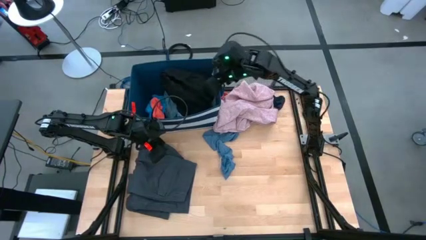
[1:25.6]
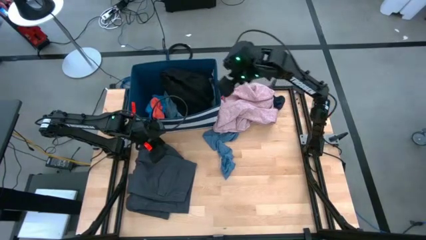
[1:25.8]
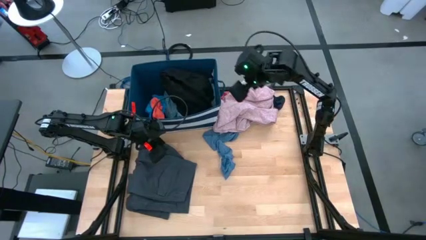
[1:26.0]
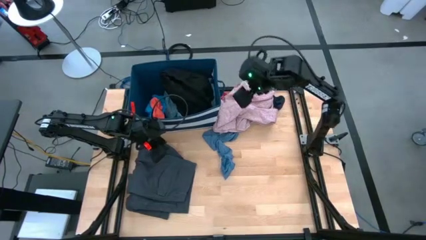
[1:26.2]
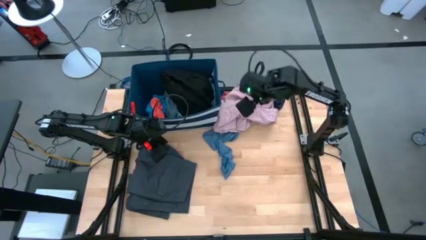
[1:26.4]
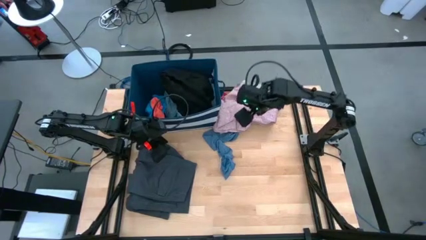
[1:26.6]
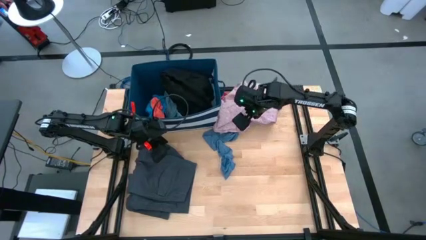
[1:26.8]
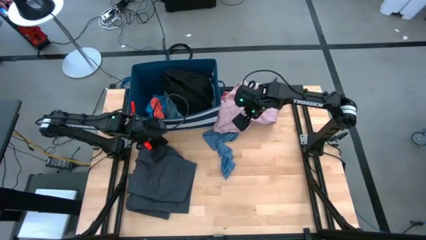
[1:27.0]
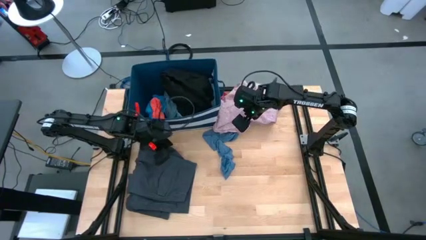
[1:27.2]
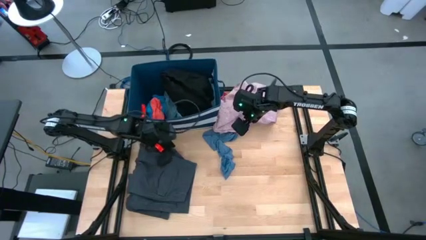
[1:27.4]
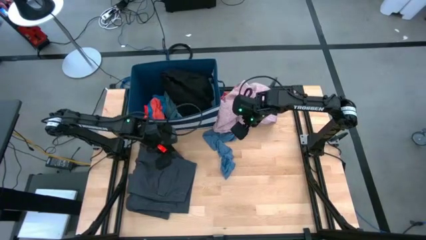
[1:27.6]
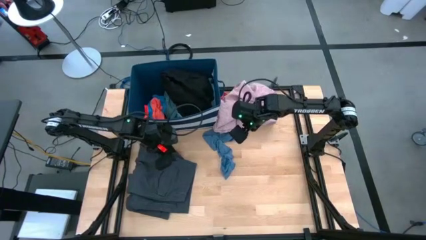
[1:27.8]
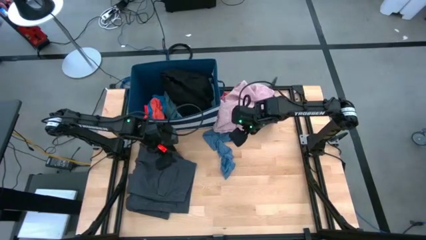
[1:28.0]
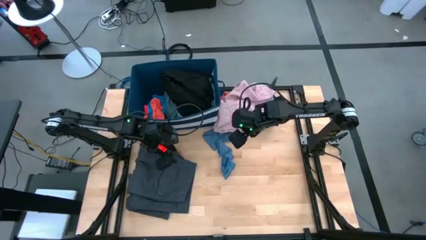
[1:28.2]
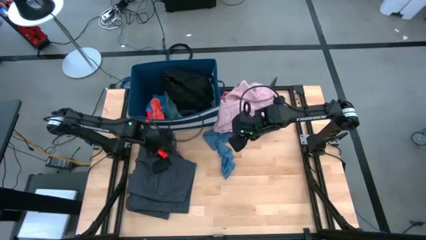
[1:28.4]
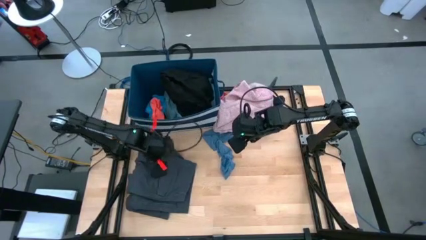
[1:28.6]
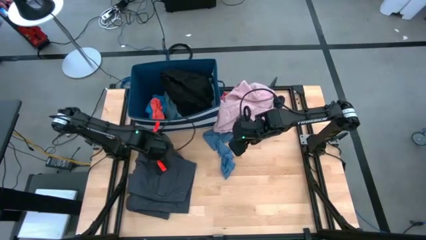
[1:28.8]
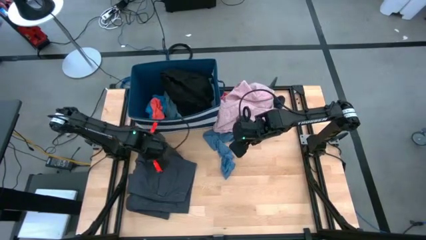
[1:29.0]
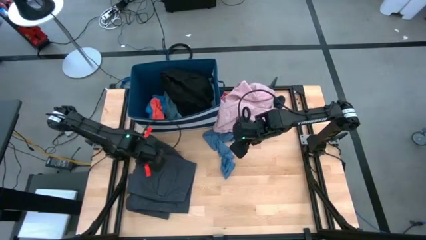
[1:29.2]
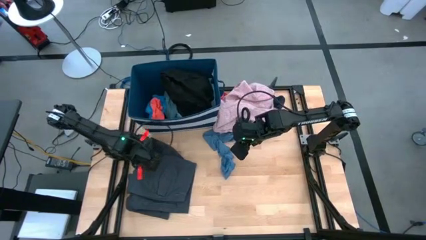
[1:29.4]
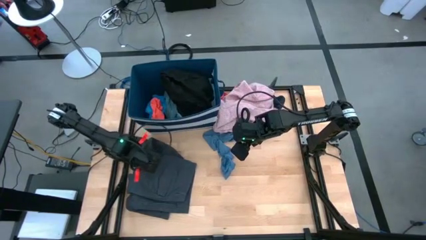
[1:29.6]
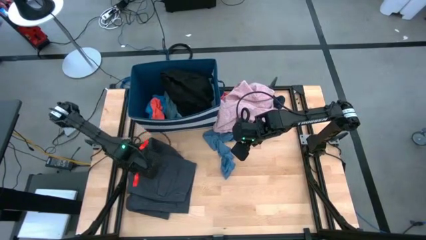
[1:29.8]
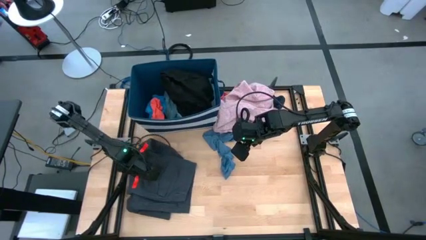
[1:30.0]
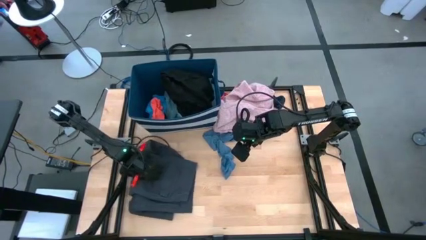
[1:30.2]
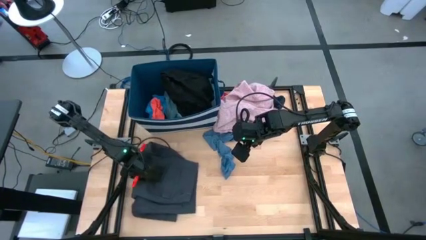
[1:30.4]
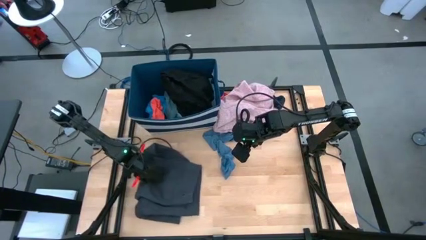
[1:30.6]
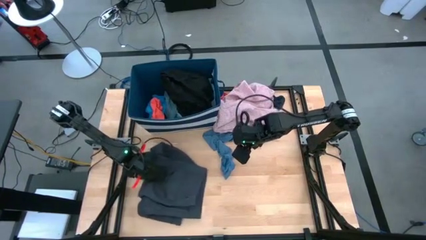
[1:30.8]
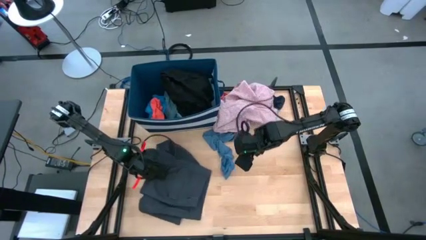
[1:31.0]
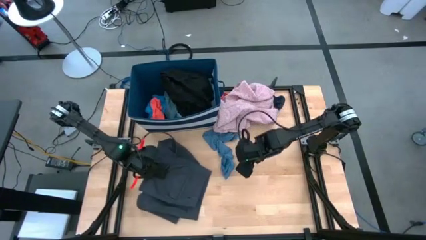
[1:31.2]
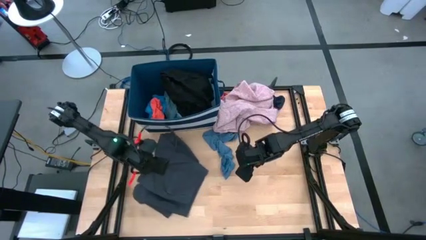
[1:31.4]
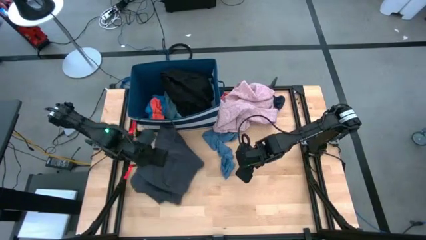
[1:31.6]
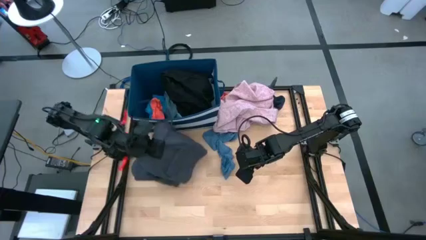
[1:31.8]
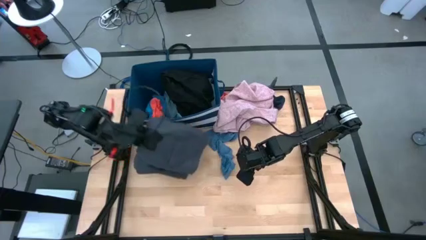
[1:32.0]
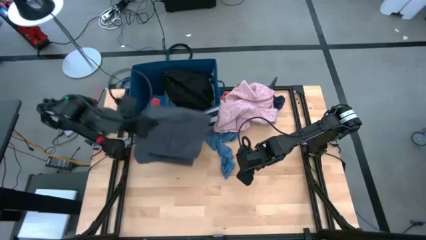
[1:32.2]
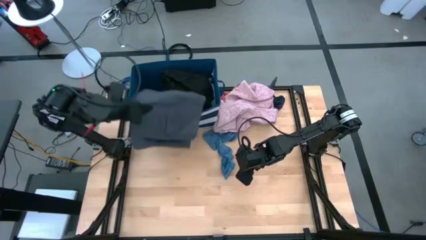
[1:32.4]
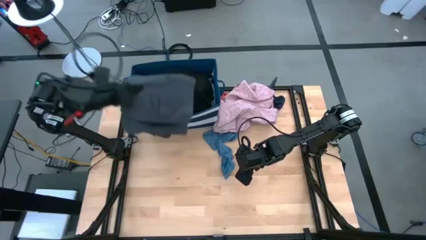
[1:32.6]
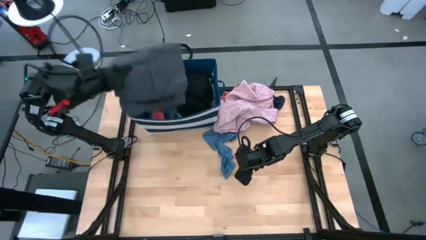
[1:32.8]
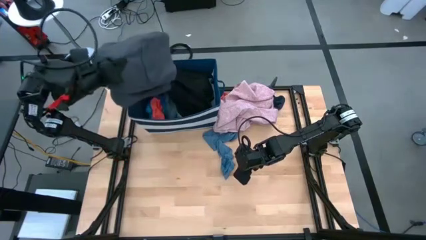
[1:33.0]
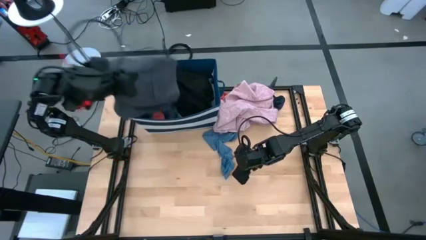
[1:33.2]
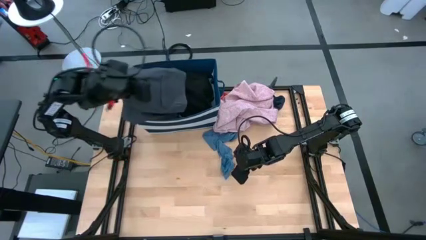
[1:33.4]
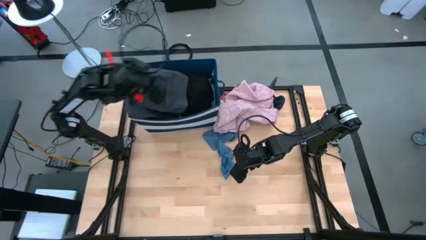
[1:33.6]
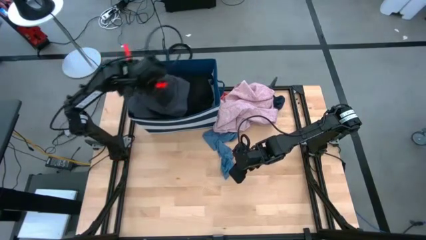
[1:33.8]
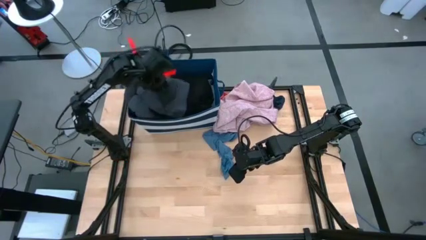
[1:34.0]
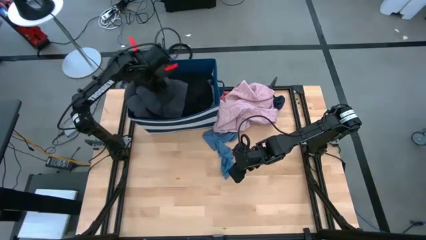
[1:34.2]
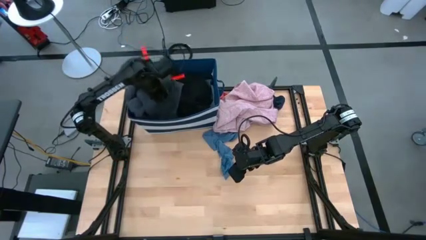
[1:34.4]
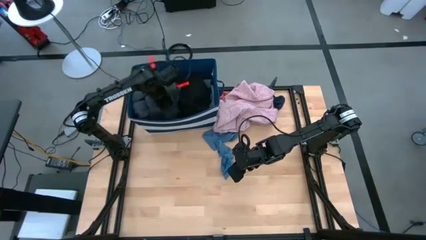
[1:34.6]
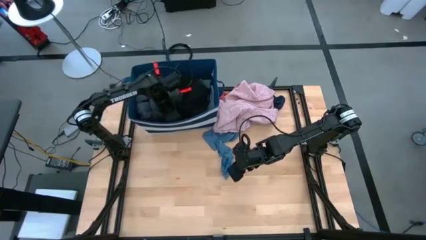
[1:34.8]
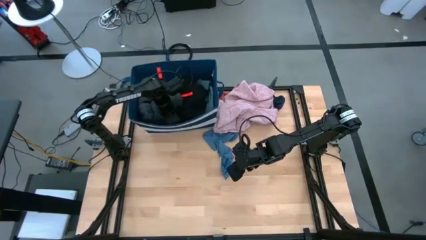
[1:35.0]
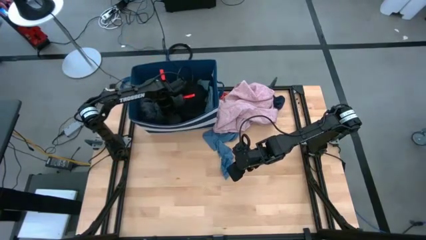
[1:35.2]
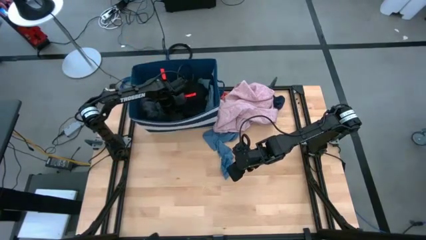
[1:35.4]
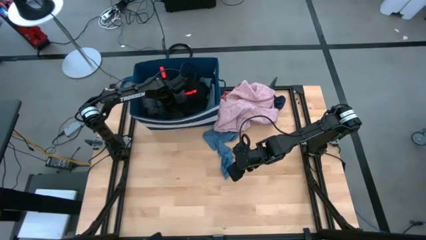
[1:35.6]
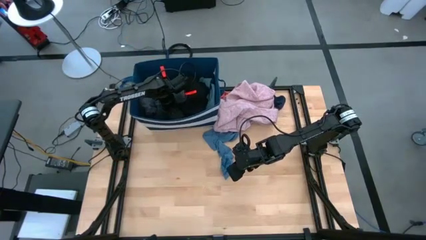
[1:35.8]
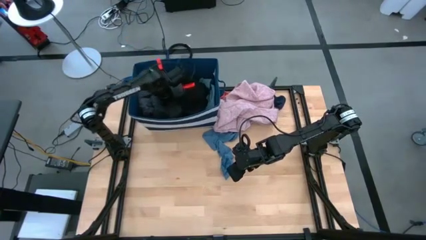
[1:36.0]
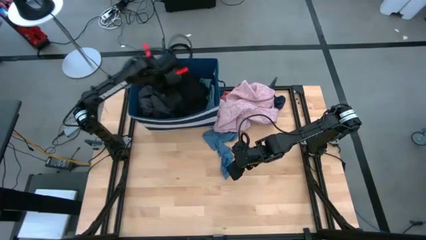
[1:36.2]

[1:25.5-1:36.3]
Task: Sort clothes
Put the gray pants into the blue laundry bin

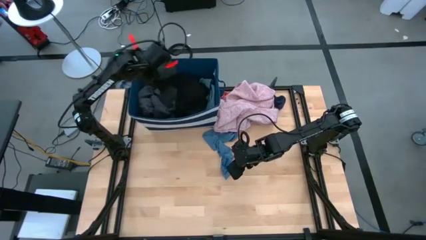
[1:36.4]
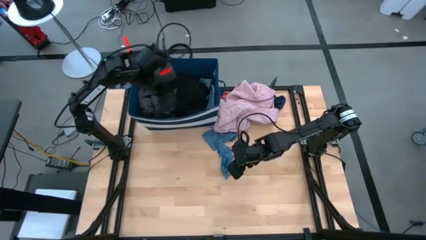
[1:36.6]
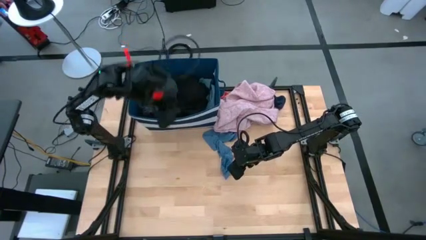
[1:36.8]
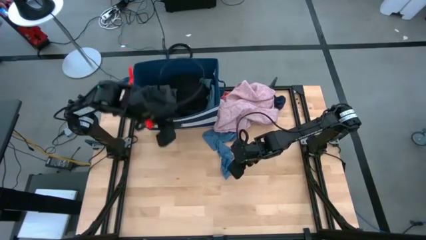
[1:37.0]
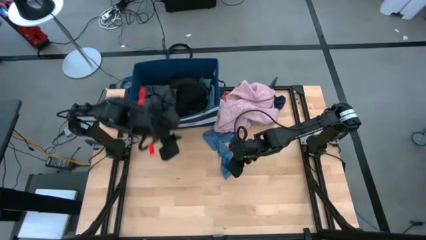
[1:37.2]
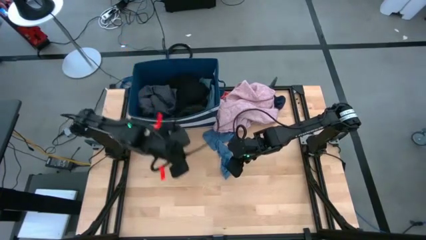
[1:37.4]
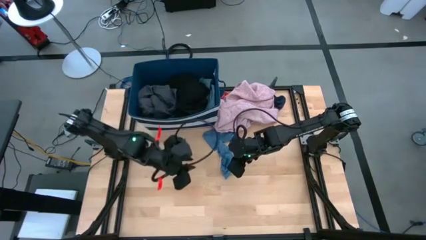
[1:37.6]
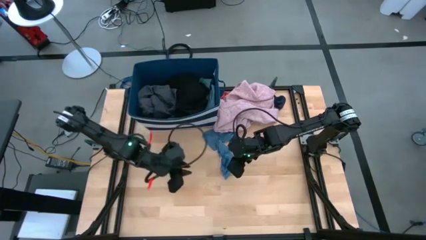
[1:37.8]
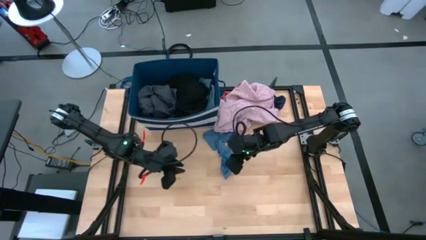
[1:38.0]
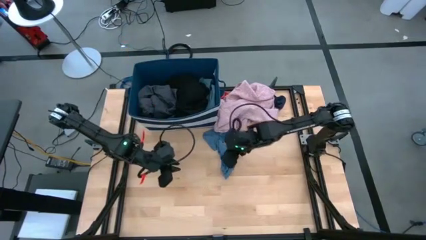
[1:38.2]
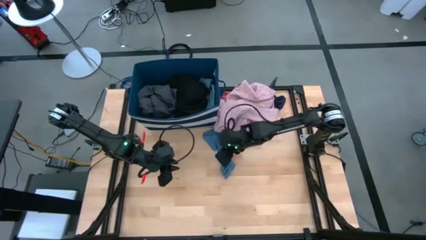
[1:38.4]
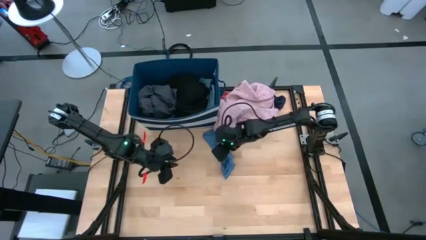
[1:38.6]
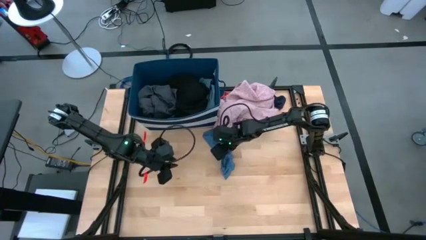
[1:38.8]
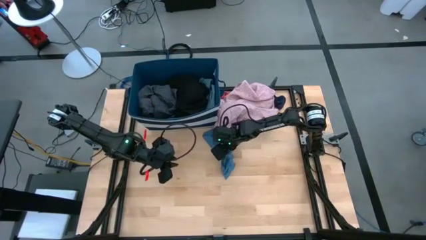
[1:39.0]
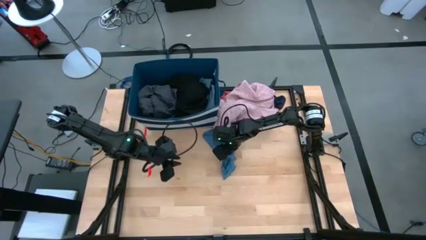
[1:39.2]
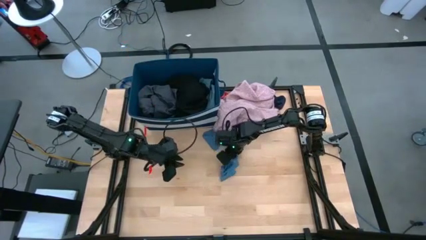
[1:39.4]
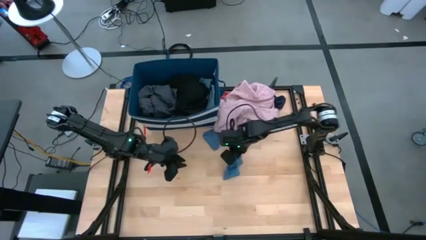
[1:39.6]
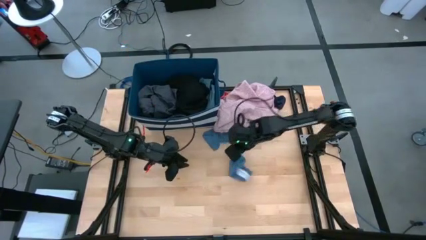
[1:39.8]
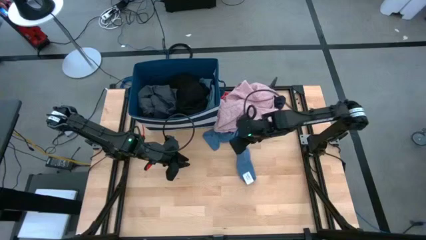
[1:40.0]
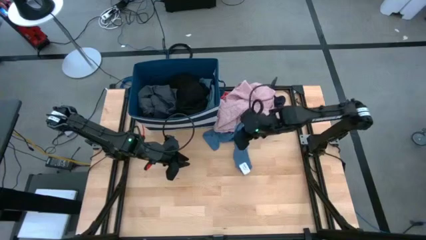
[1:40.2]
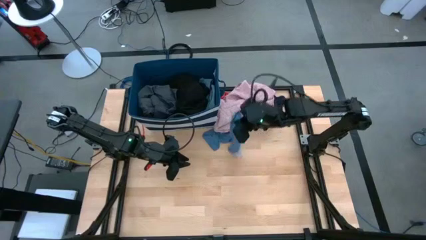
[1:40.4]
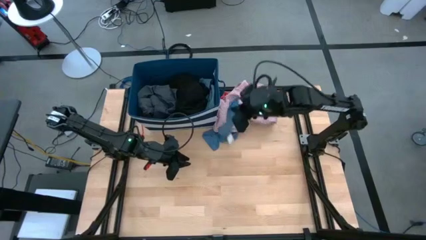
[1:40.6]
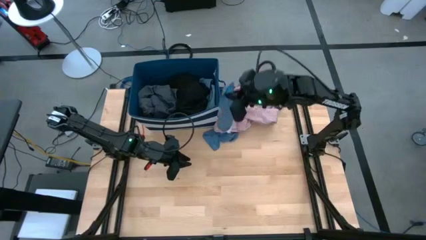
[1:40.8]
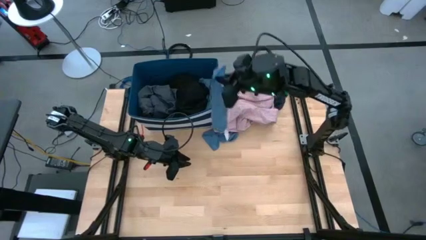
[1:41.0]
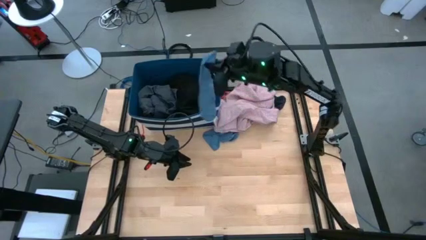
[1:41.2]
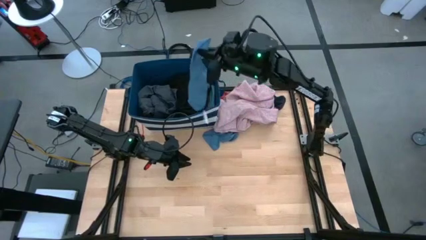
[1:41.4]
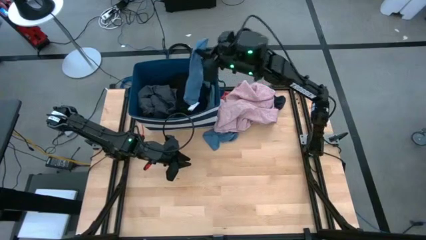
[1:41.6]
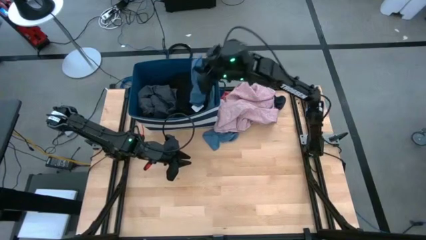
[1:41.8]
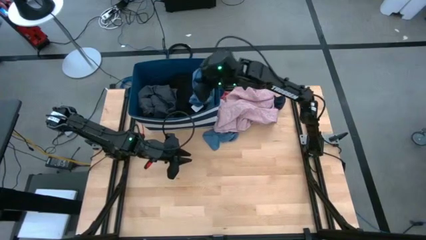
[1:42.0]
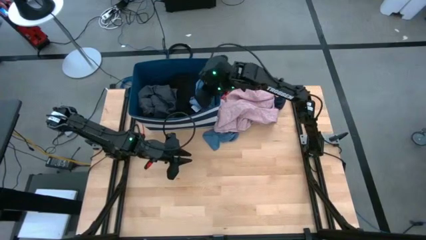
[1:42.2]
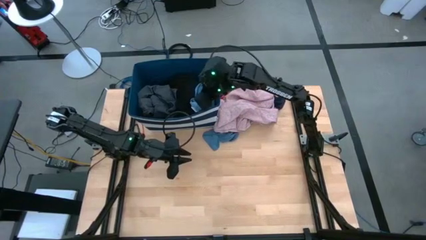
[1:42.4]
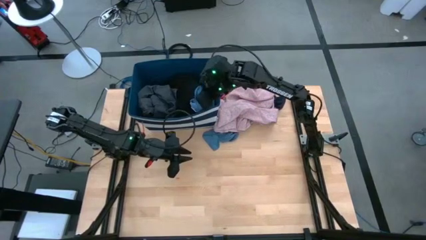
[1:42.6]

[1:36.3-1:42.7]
Put the blue sock into the blue laundry bin
